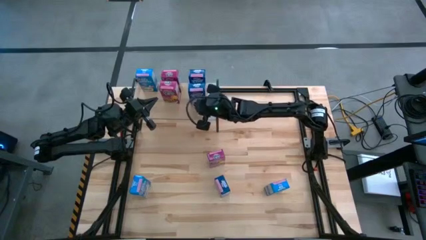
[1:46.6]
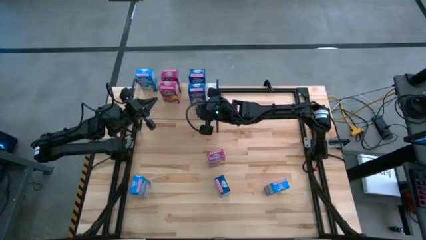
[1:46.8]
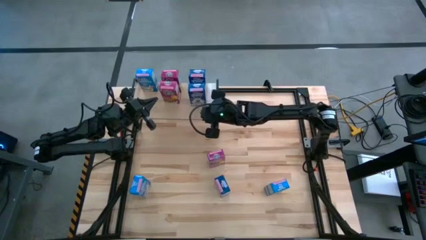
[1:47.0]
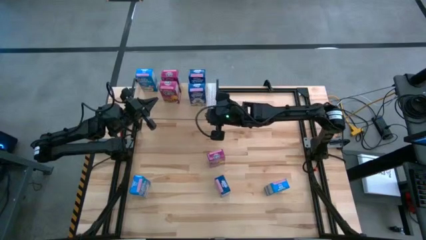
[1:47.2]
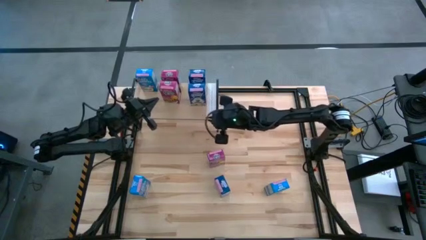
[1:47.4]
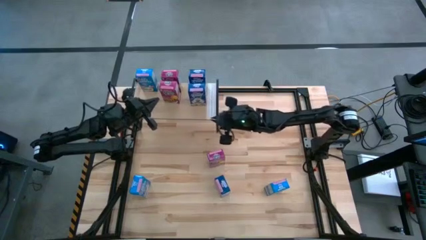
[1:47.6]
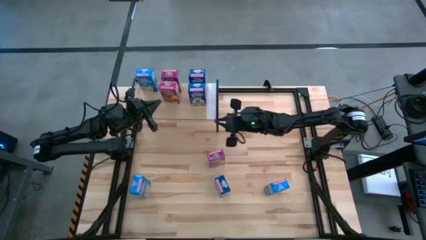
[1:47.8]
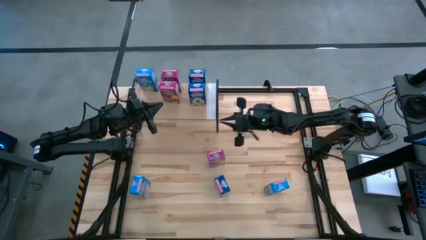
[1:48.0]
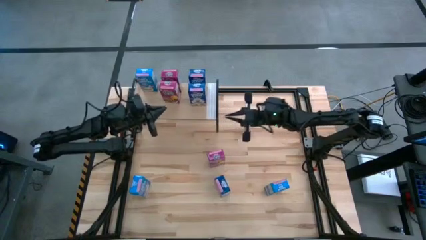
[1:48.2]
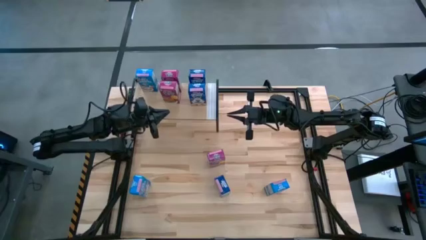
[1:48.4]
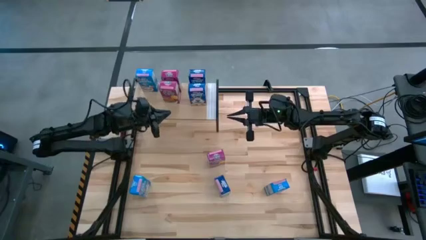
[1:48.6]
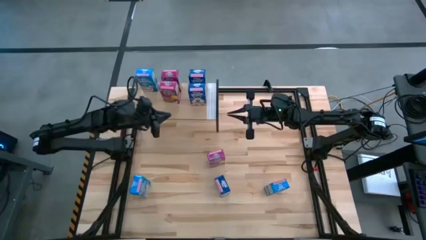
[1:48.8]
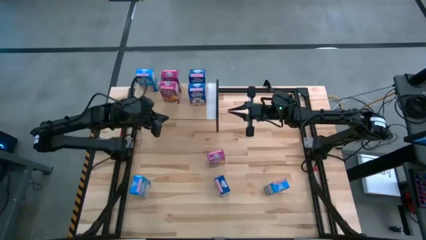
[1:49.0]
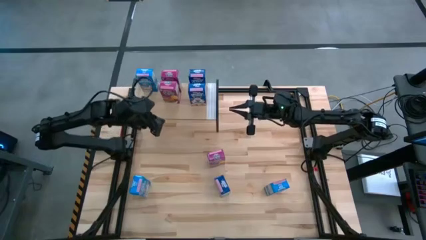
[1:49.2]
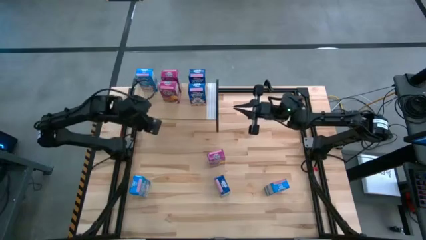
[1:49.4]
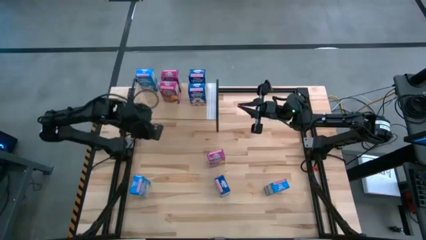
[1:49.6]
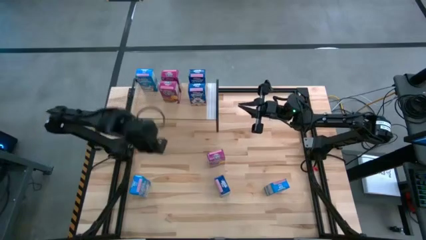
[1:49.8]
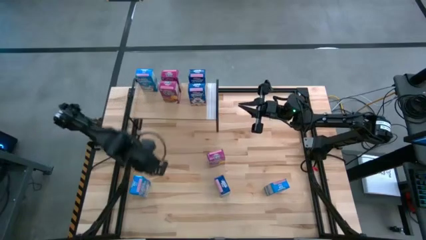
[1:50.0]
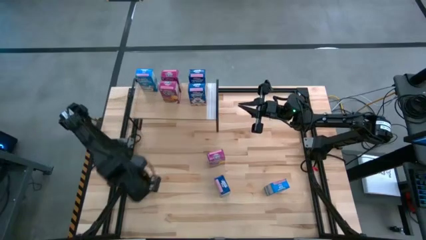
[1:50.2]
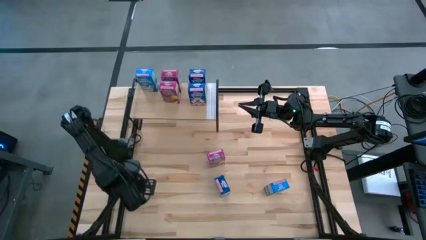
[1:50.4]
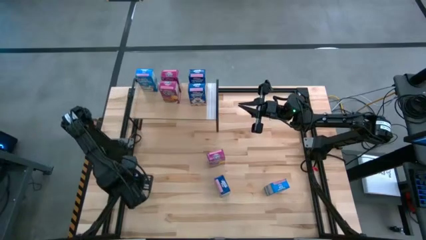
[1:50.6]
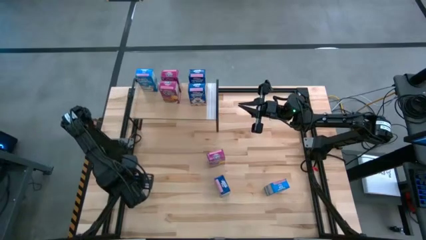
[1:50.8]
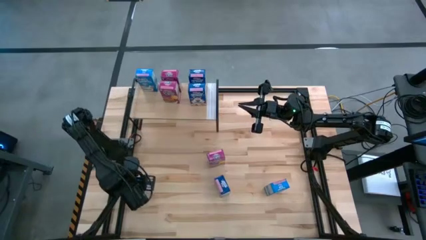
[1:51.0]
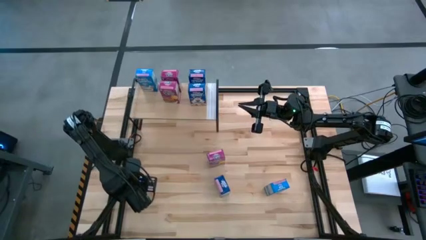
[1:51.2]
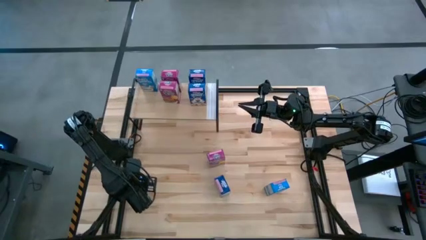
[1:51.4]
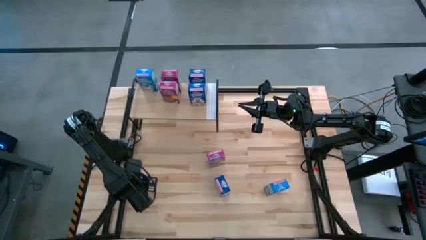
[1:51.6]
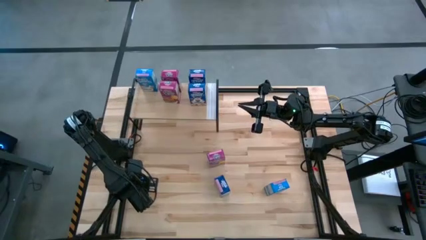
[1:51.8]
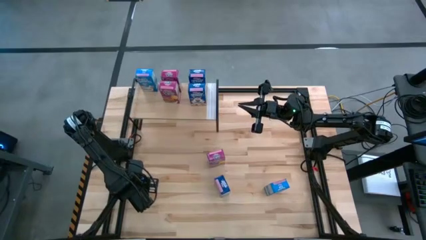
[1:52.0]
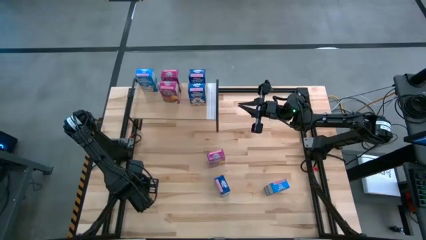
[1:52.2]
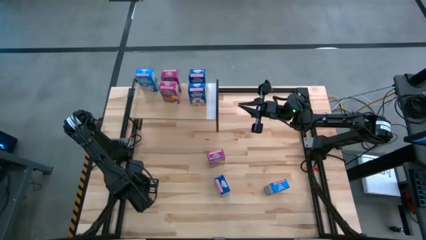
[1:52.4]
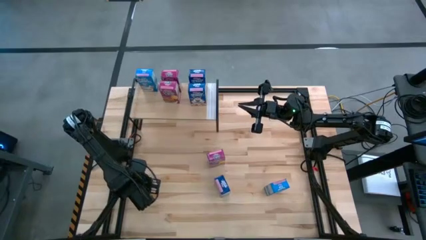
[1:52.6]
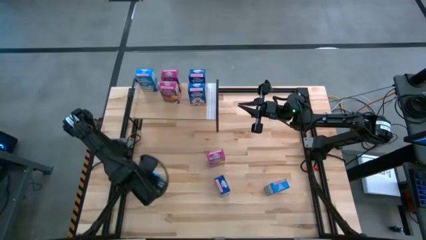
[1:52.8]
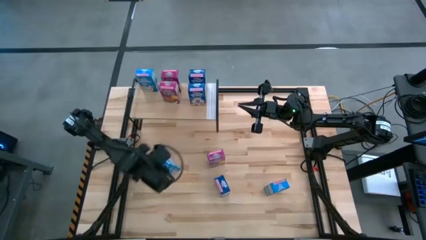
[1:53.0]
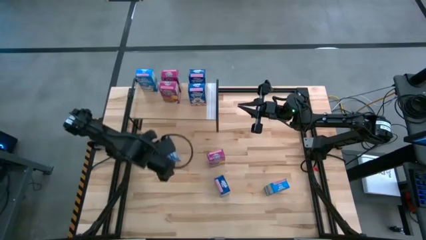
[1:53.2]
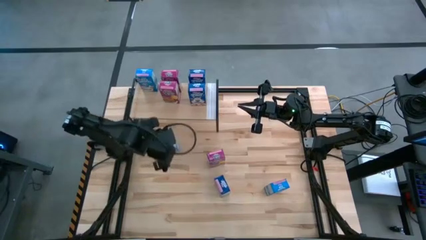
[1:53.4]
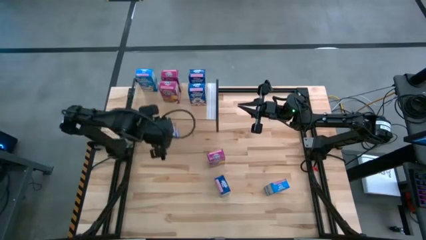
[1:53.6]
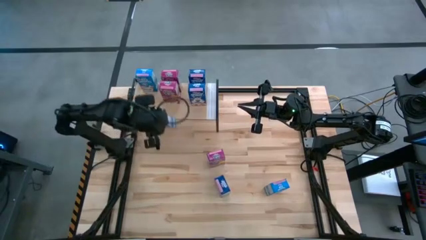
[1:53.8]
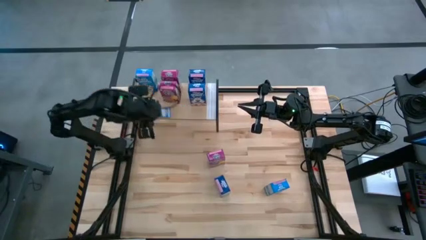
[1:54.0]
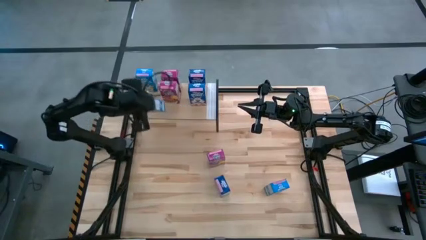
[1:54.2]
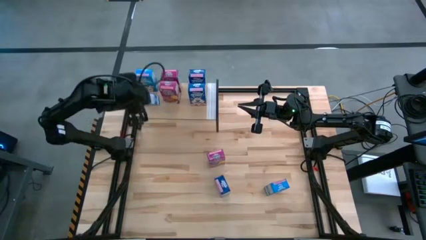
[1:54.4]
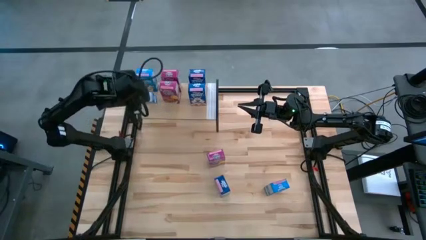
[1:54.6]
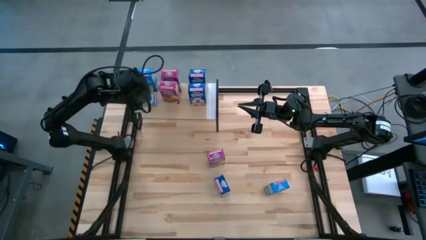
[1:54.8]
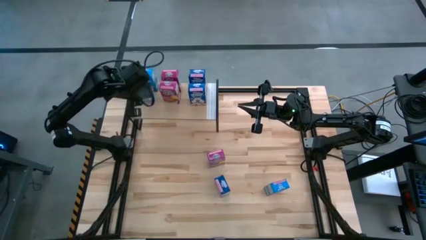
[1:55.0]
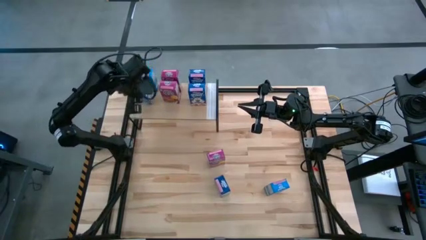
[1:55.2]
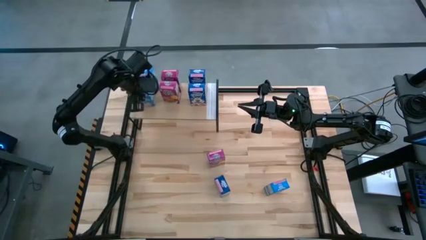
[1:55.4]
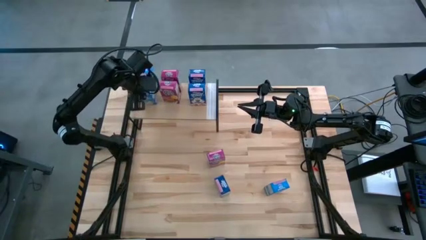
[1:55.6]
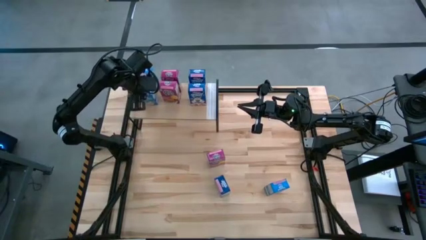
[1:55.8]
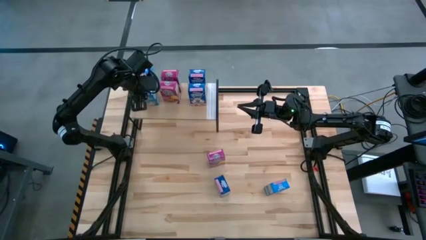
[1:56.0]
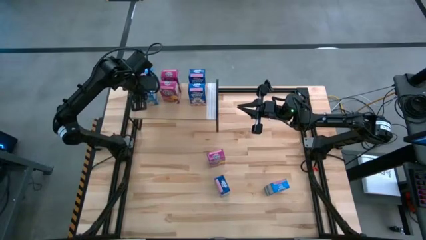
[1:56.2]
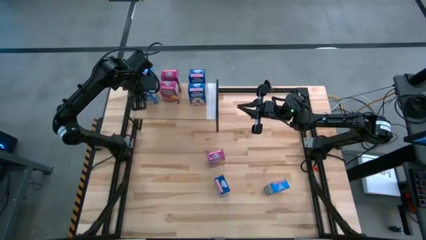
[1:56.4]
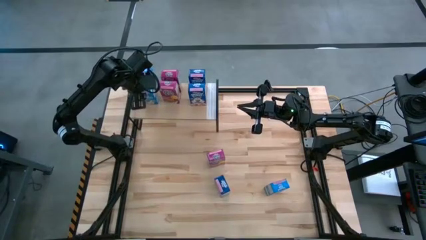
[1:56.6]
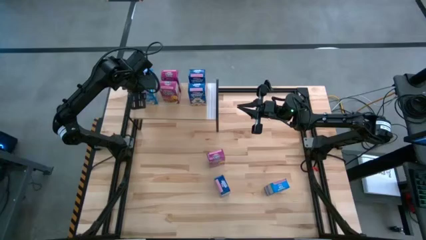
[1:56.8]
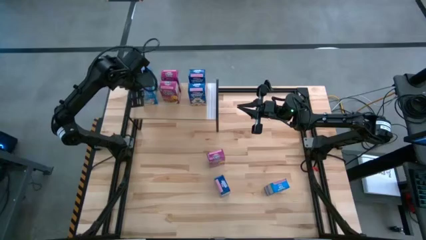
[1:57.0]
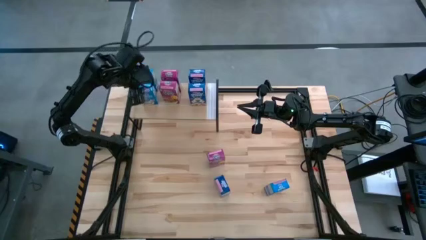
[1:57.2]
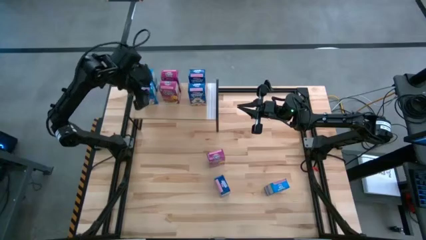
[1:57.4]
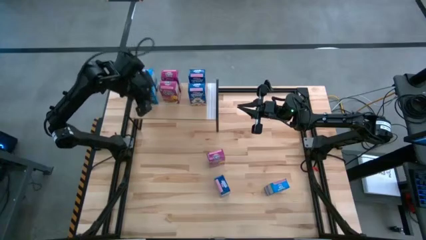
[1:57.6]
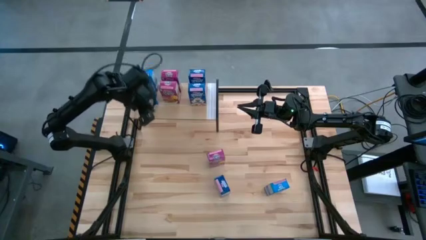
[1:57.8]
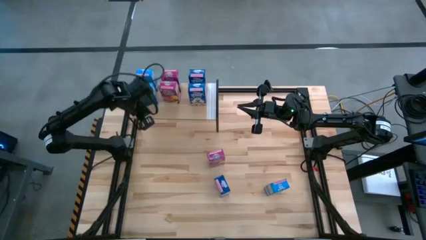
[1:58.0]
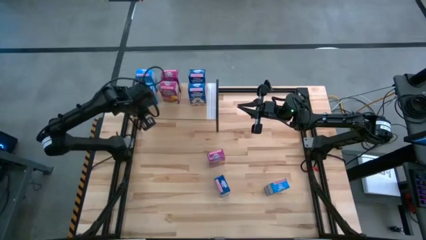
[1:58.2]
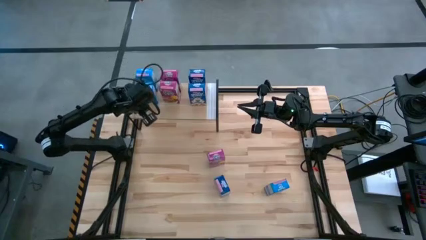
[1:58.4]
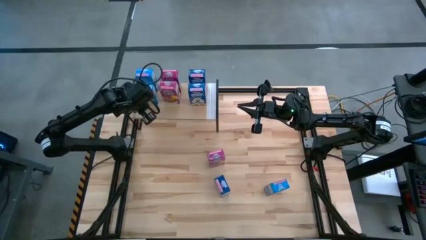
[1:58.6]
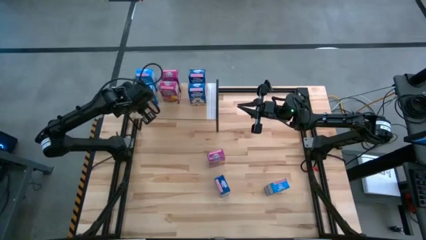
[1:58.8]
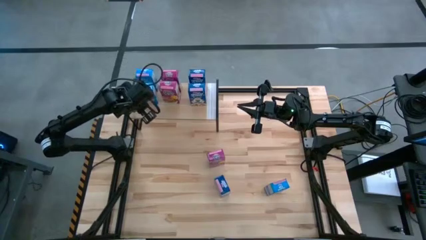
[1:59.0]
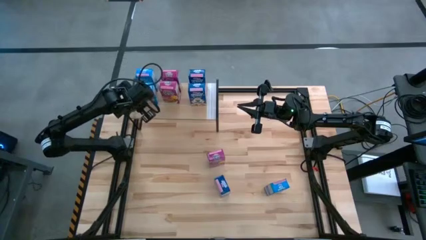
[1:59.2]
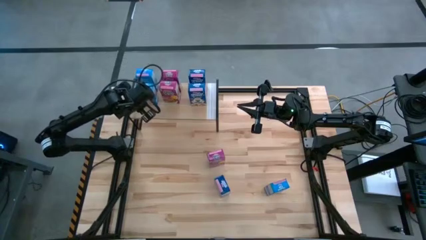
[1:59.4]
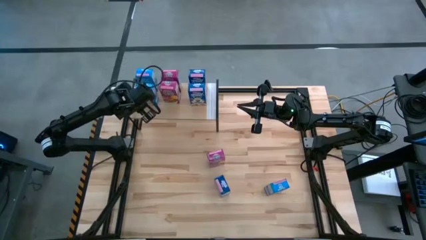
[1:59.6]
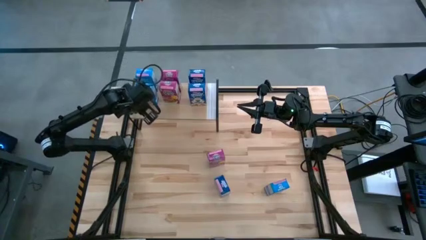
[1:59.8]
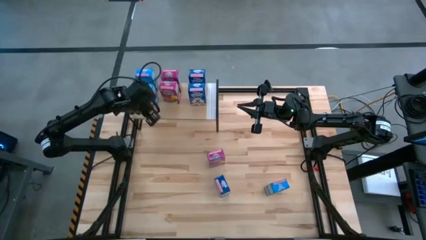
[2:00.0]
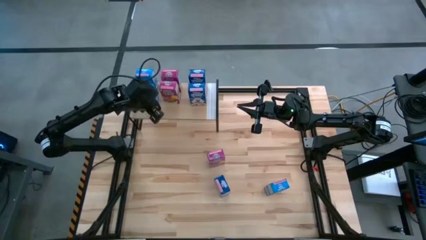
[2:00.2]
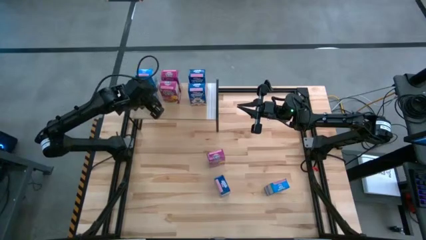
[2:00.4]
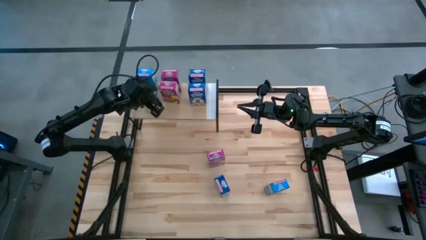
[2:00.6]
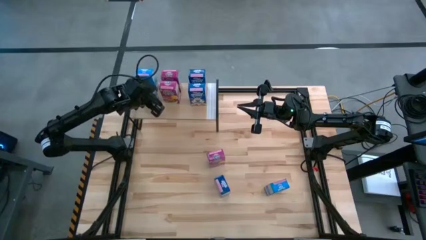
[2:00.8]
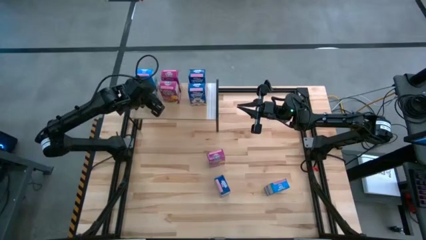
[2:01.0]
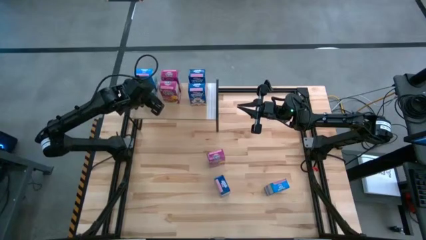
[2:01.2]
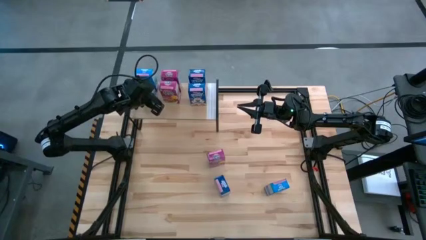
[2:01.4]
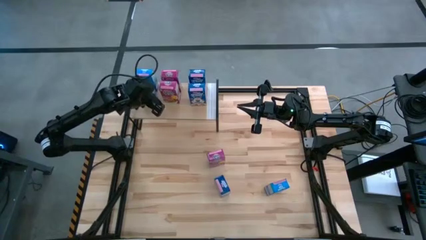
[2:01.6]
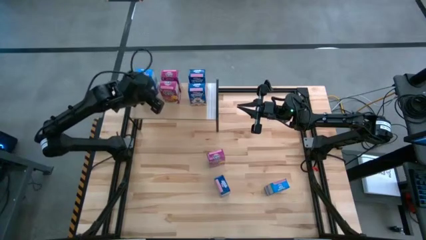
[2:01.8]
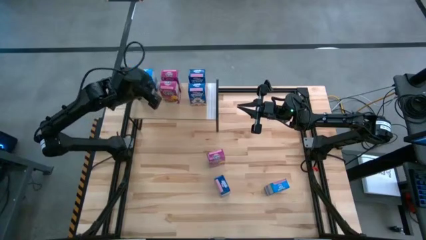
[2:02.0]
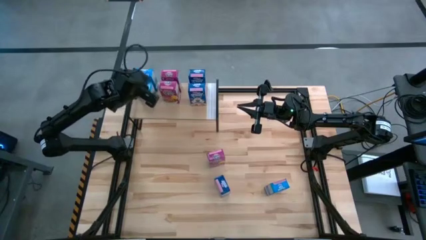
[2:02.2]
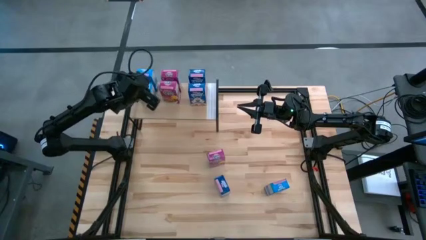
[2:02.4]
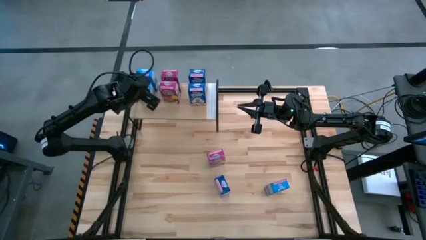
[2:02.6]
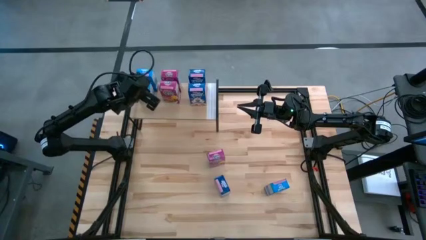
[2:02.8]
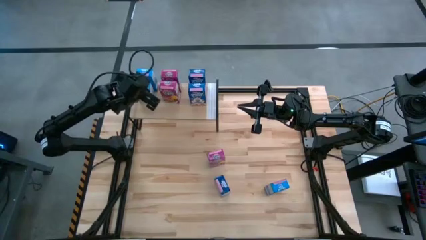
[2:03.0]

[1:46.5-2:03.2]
Task: Stack cereal on shelf
Put the left light blue cereal box on the shelf

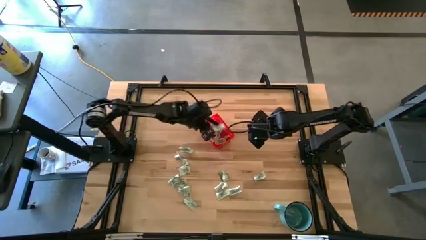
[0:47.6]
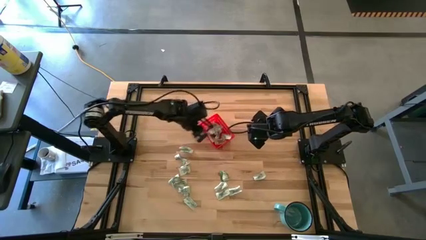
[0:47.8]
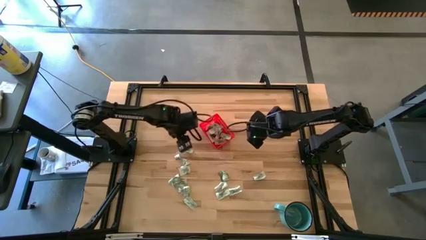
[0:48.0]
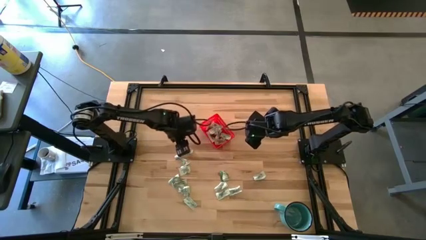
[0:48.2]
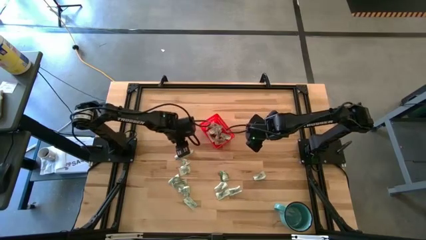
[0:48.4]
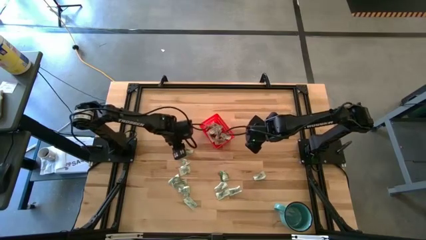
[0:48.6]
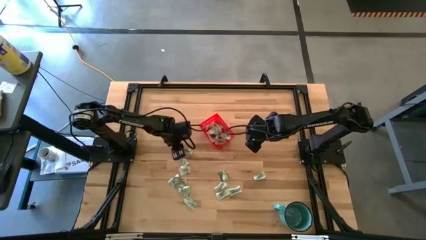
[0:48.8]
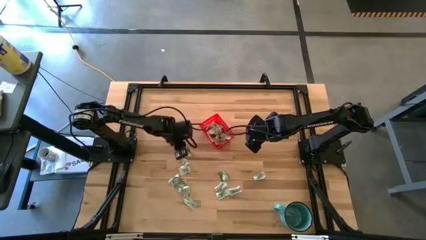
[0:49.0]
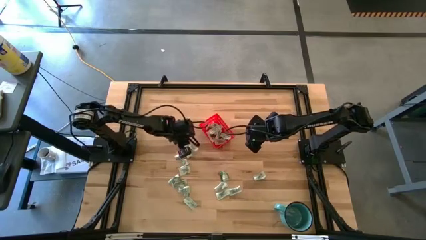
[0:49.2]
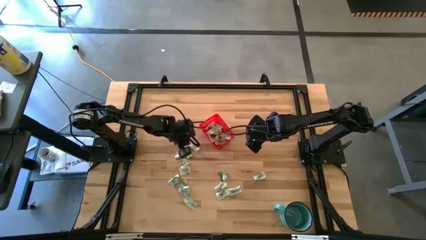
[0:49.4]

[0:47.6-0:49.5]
Task: Pick and place Stevia / Truvia into bins
Put the stevia packet into the red basket
